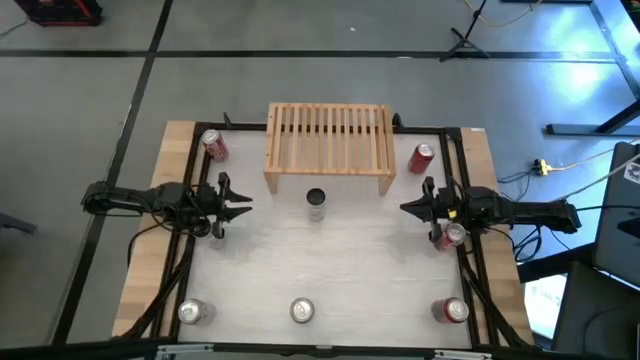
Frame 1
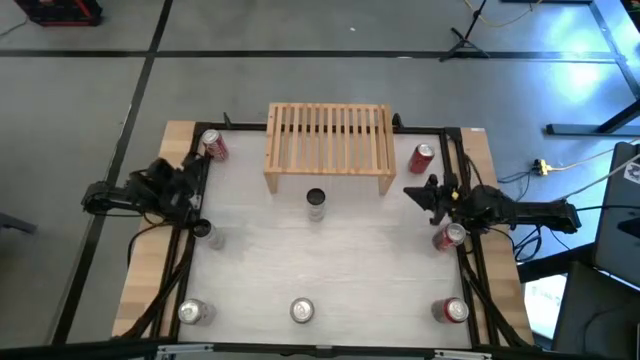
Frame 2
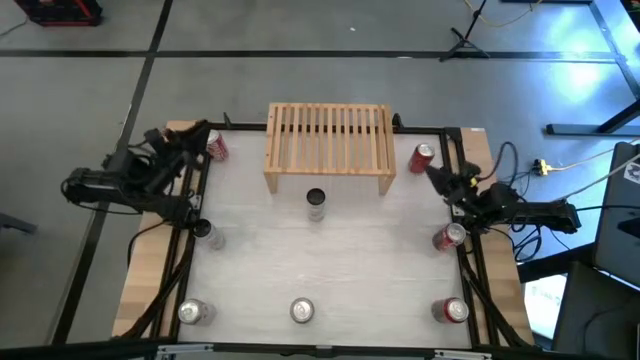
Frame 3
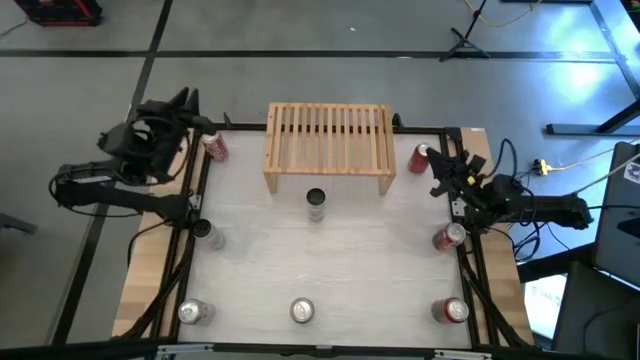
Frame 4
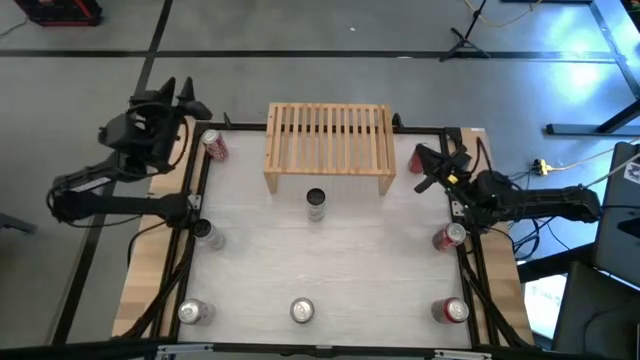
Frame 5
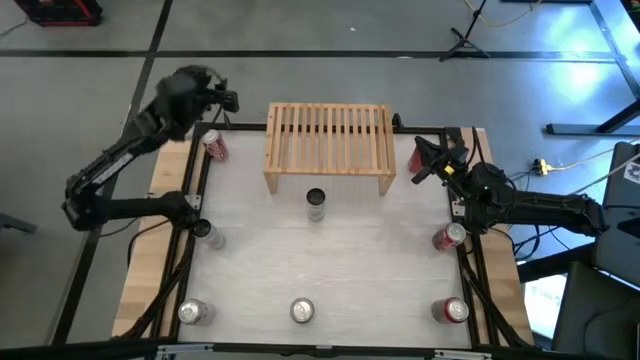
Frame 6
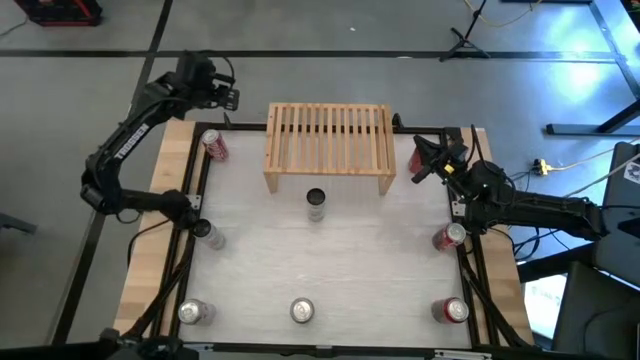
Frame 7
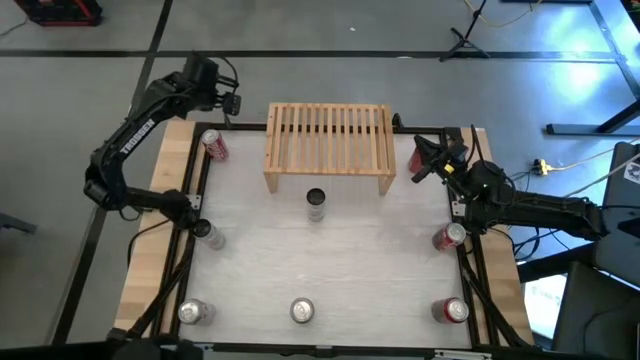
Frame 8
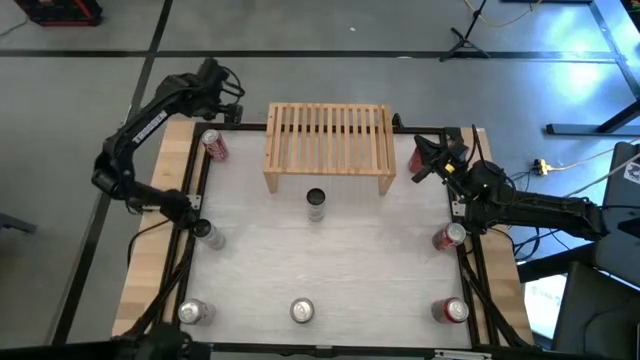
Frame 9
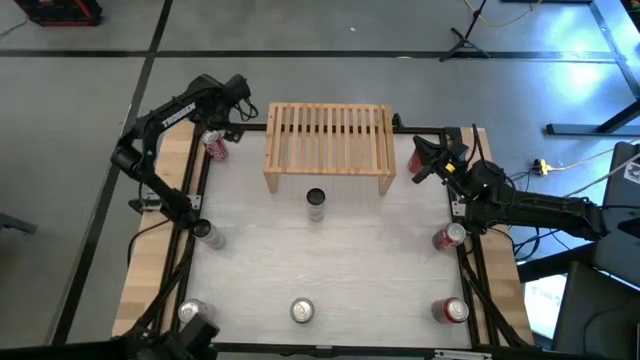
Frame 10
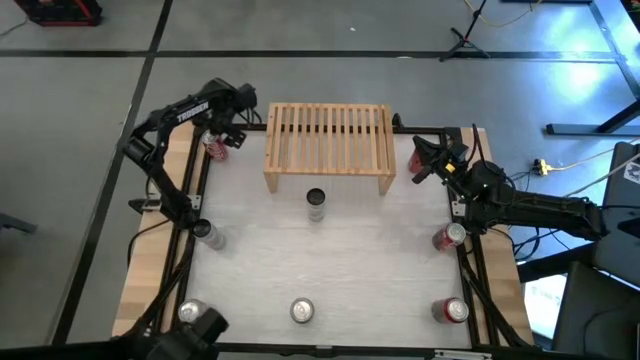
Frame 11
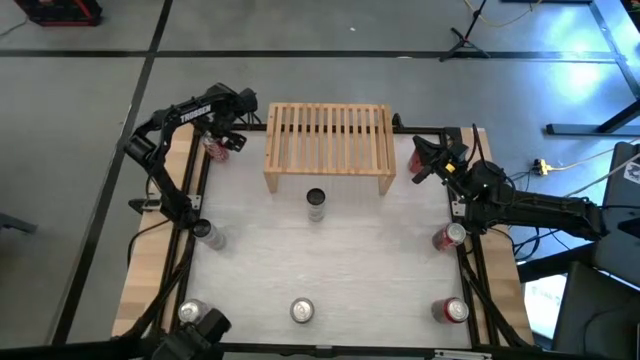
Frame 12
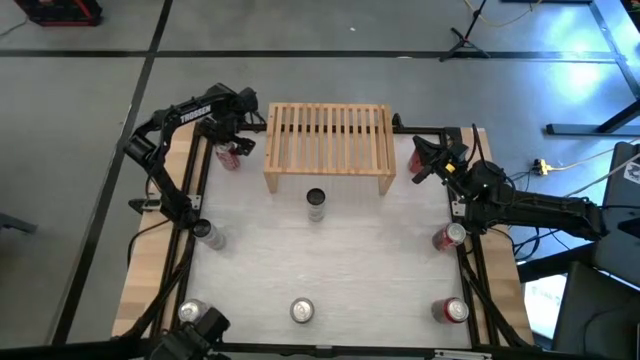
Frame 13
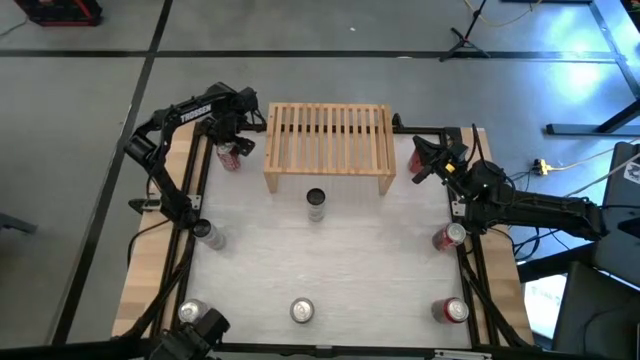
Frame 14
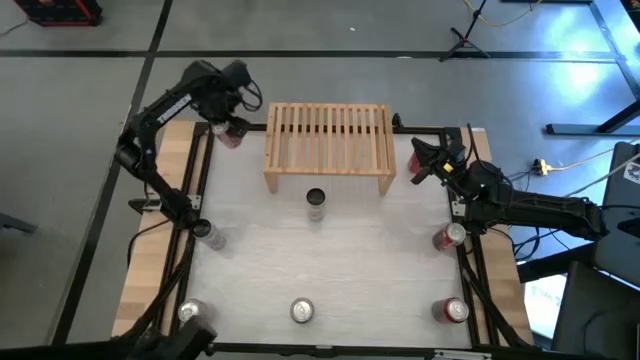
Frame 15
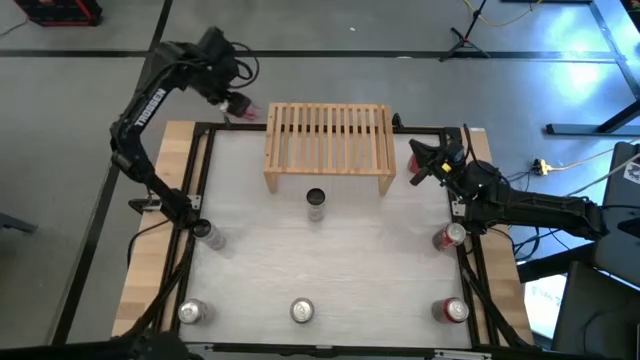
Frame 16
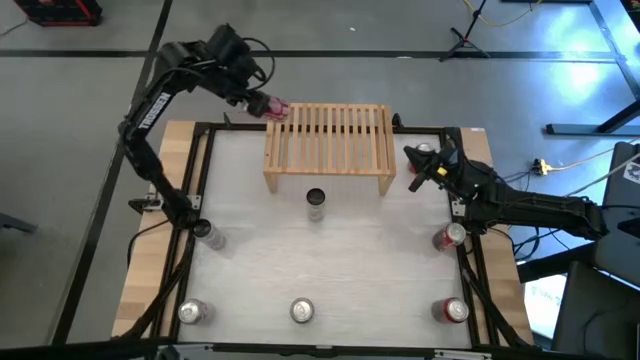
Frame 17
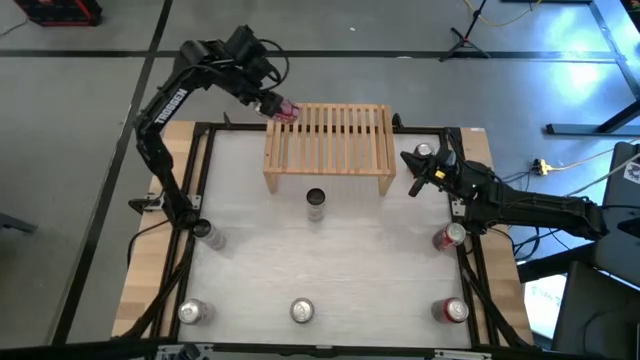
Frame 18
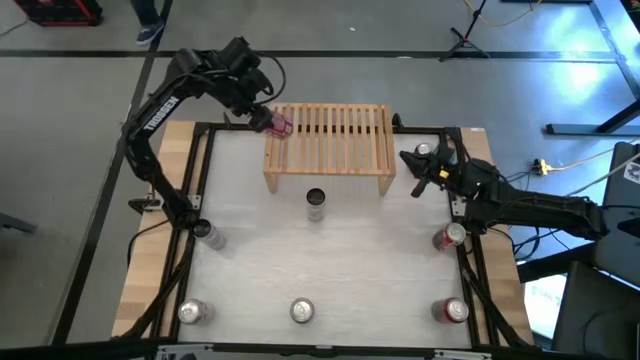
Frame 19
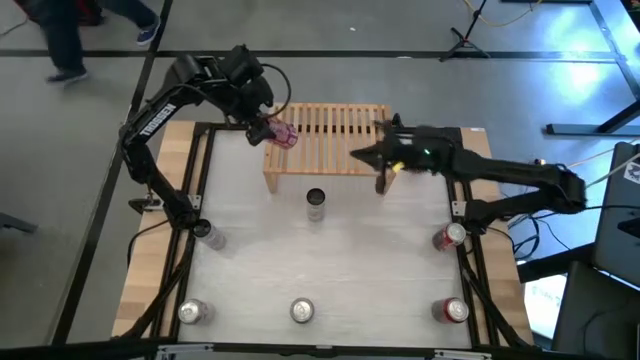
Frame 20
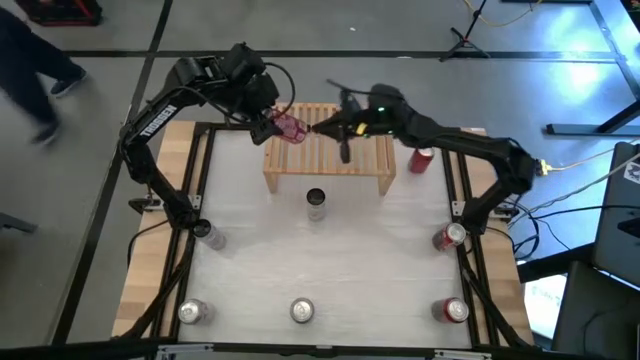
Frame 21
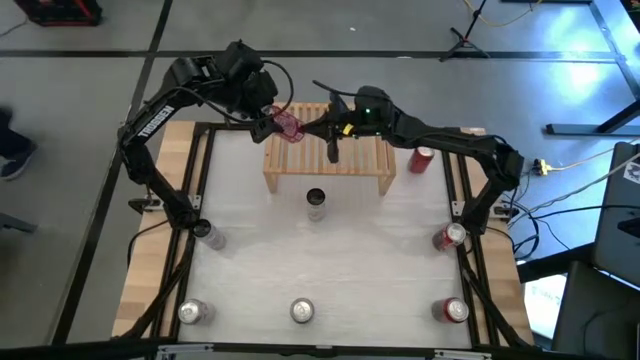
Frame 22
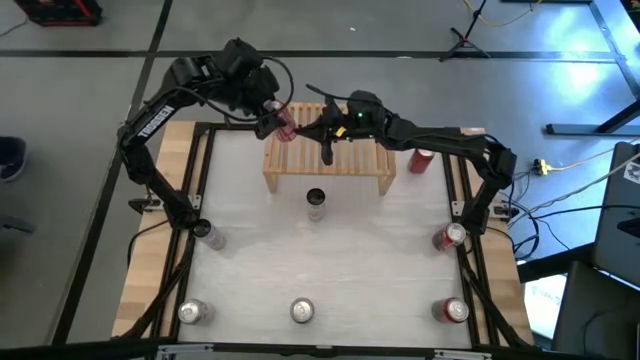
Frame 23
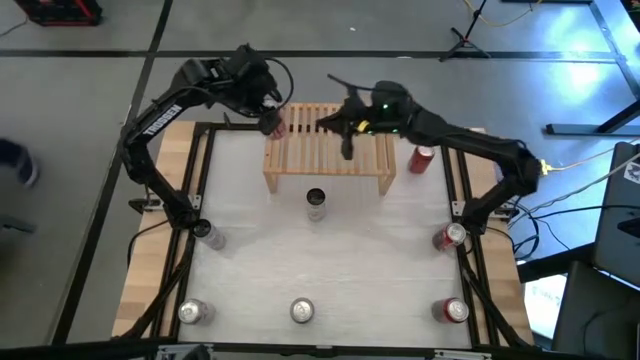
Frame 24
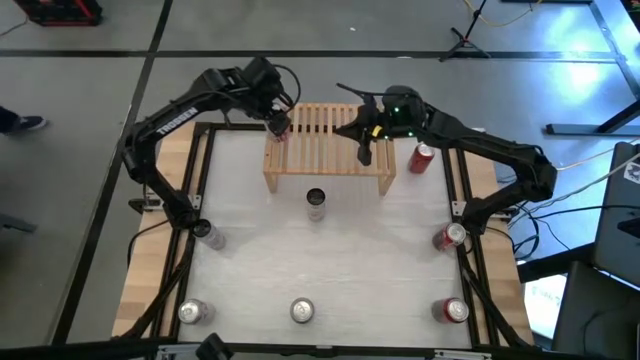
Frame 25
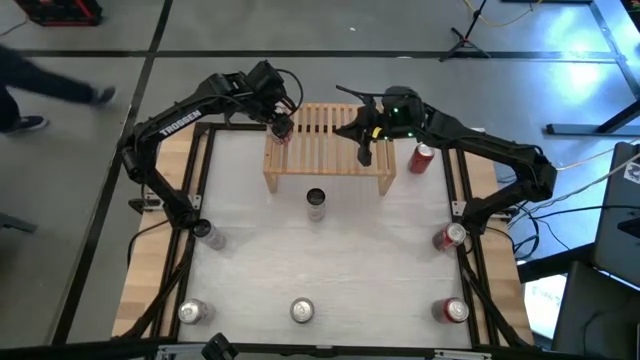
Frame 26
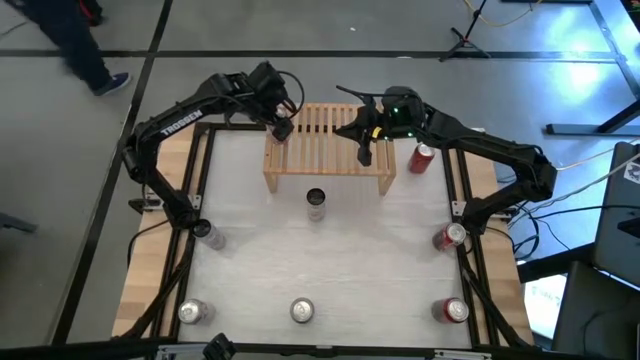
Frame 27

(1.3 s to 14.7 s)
Task: Place canned beverage on shelf
Put the left red soda can on the shelf
